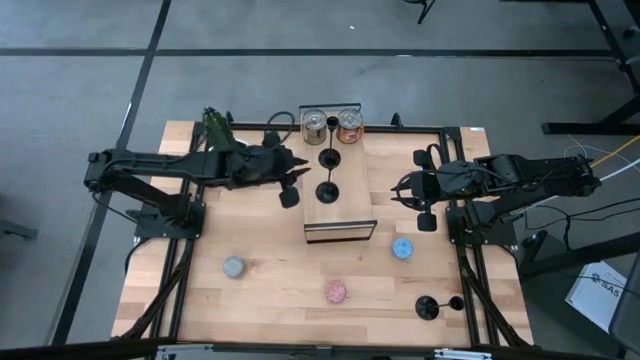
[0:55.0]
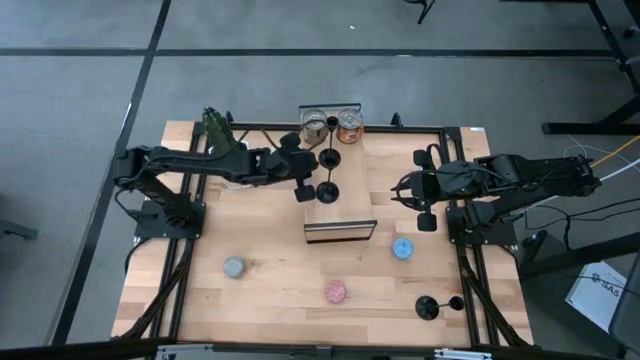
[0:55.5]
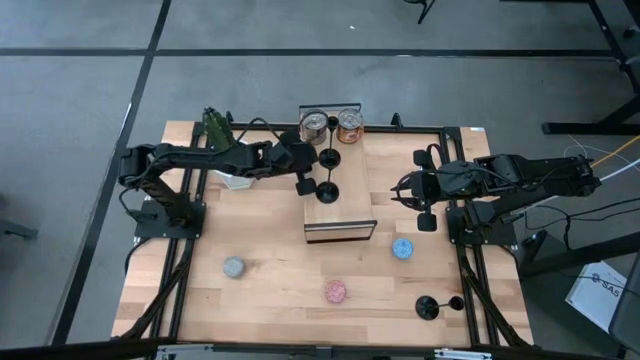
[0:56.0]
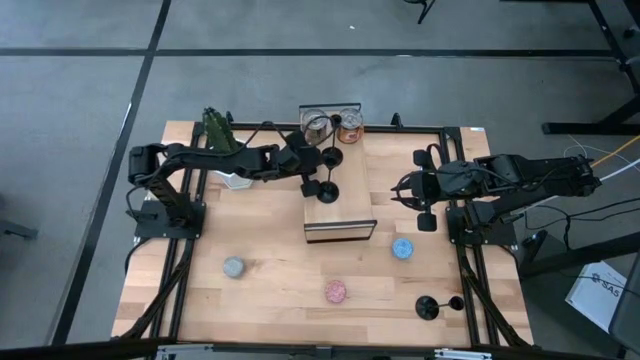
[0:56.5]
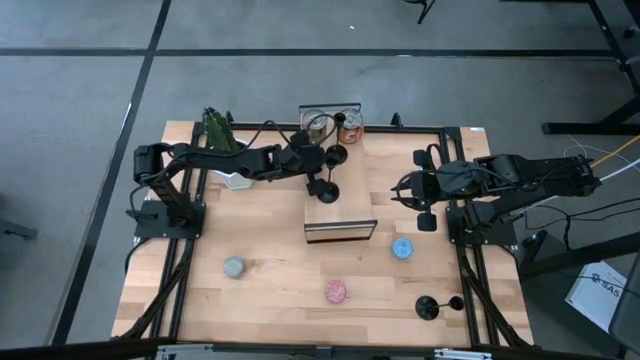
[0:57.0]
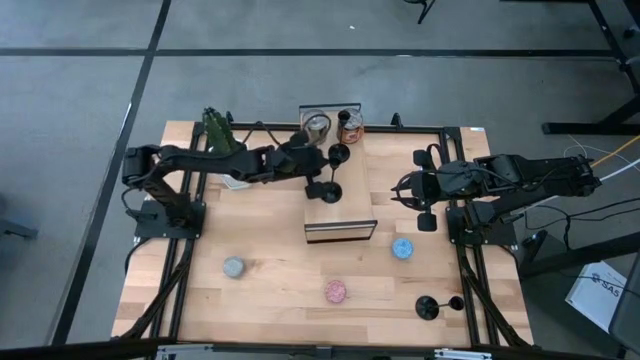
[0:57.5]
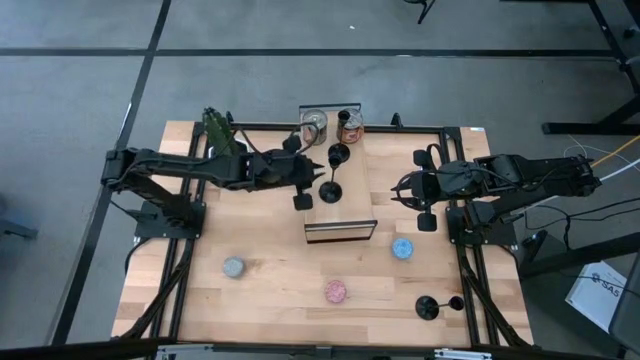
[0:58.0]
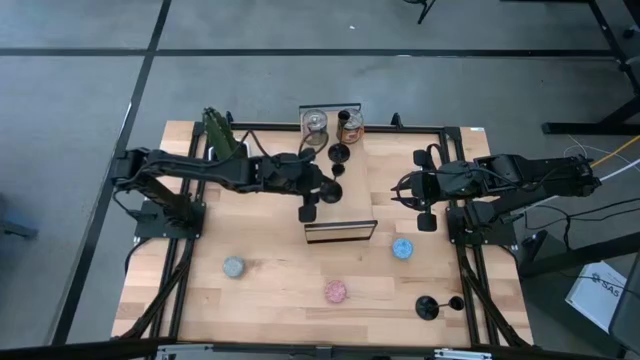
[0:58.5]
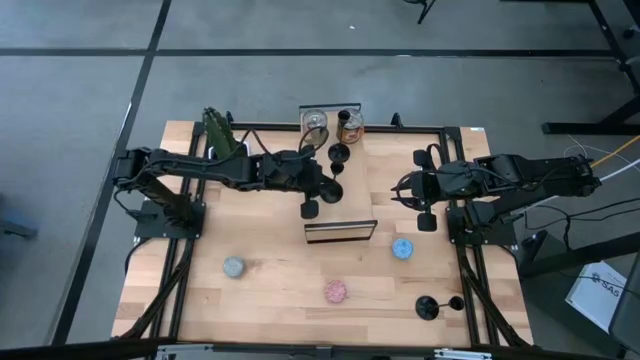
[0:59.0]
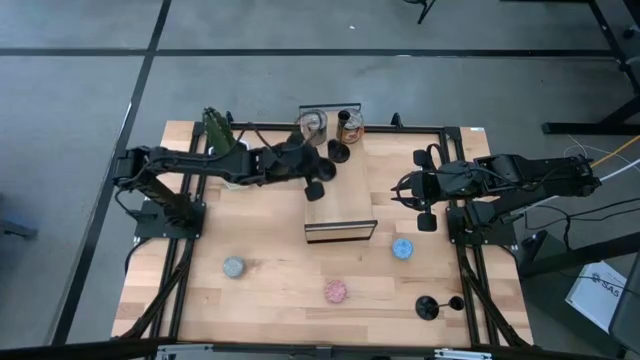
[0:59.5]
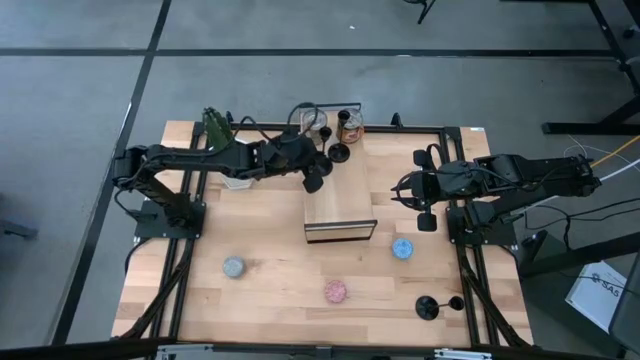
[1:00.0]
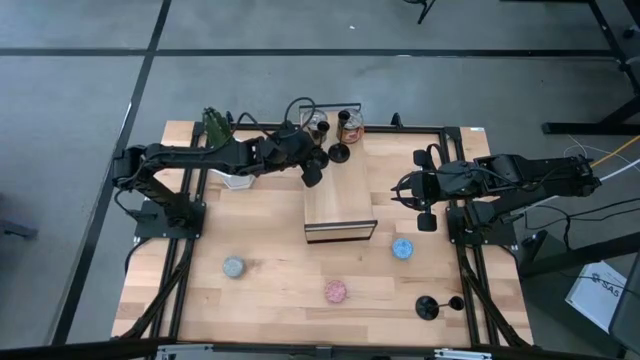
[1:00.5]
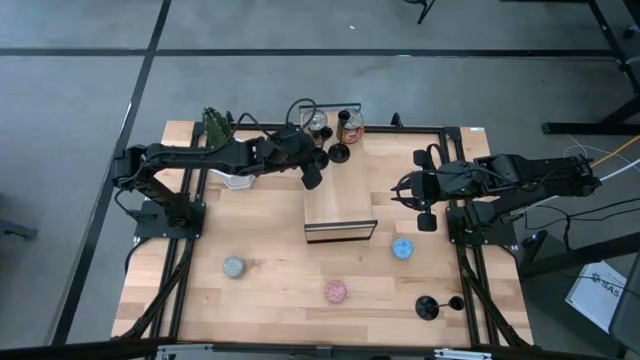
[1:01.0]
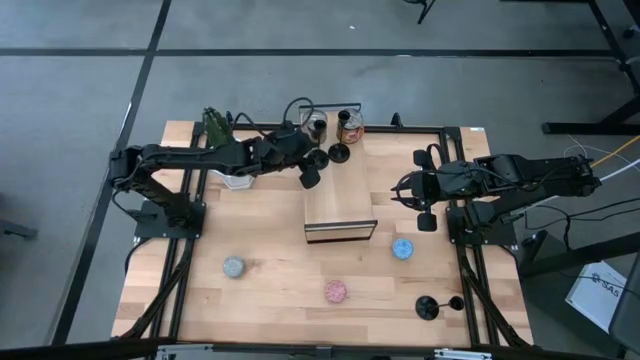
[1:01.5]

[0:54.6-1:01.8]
Task: Pick & Place candle stick holders
Adjust the candle holders on the shelf

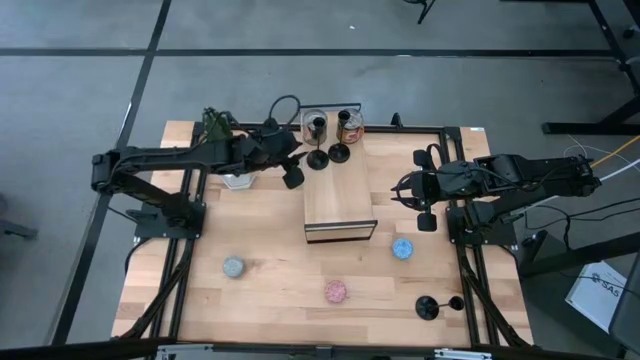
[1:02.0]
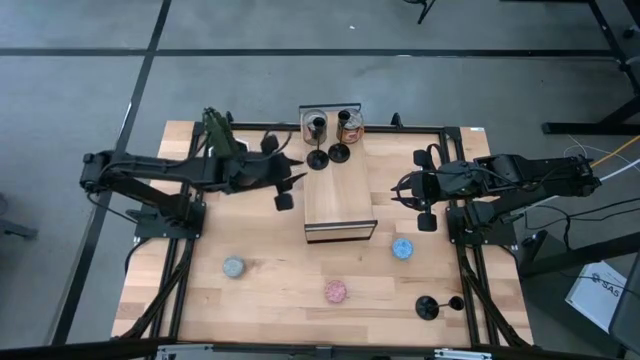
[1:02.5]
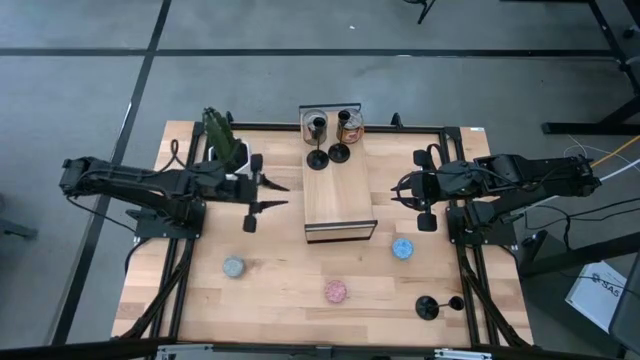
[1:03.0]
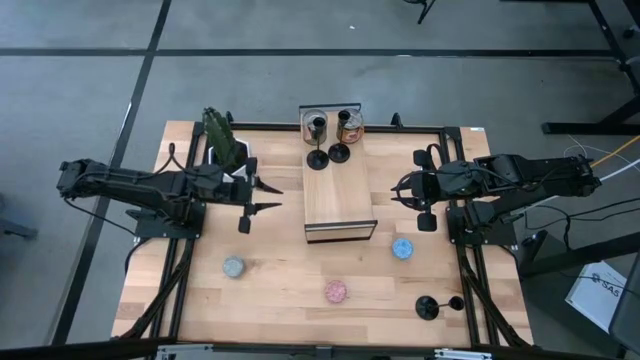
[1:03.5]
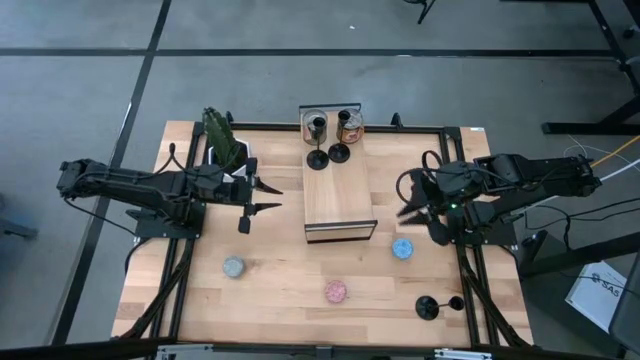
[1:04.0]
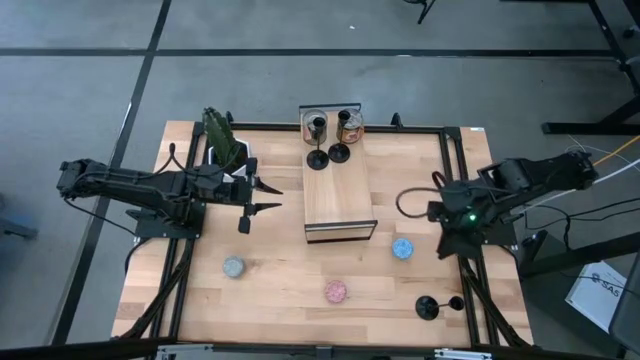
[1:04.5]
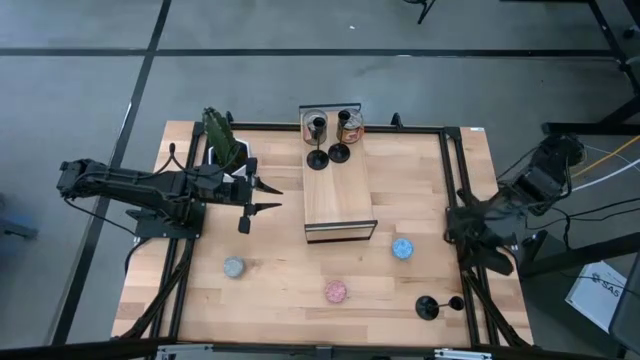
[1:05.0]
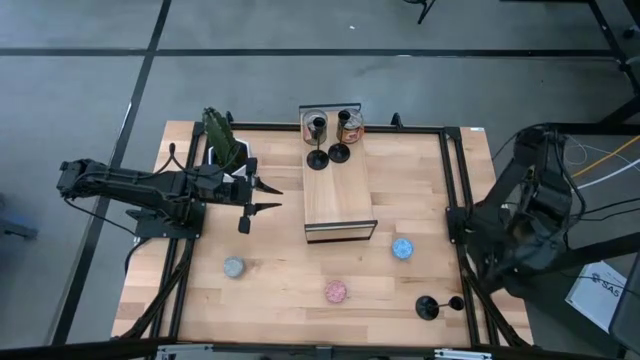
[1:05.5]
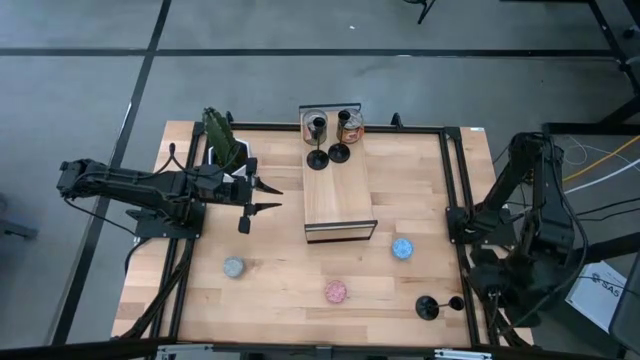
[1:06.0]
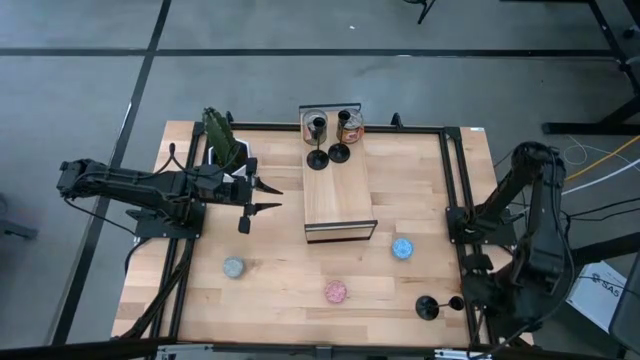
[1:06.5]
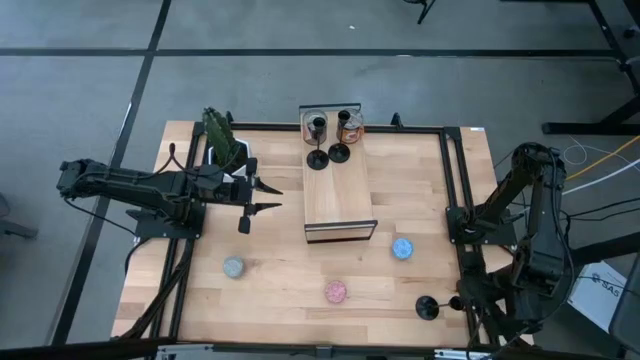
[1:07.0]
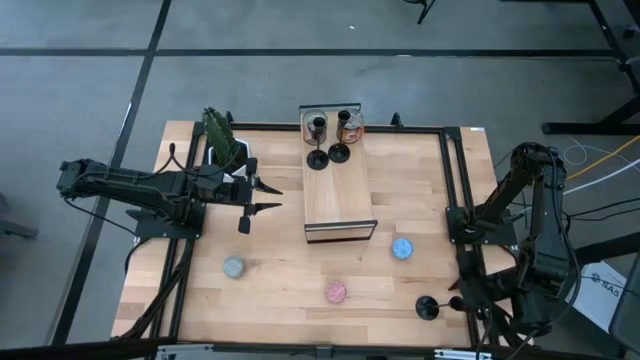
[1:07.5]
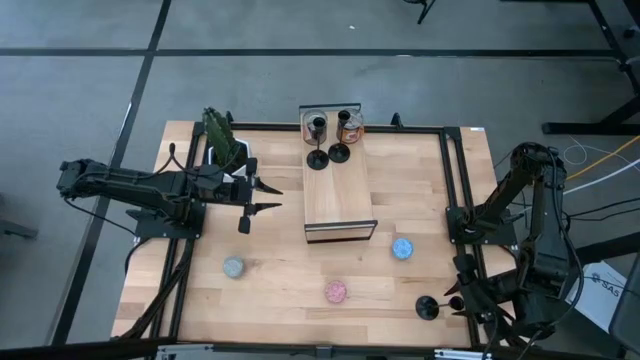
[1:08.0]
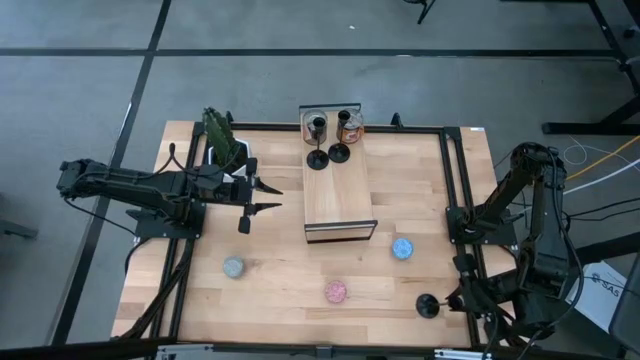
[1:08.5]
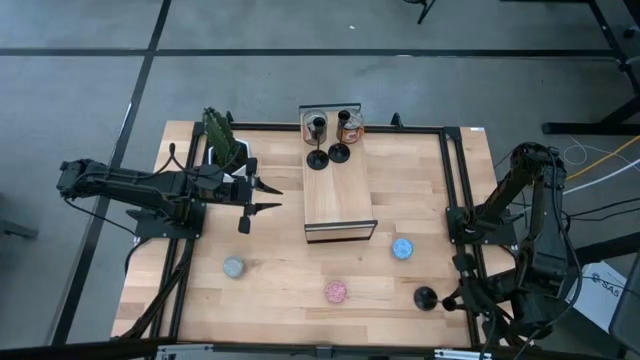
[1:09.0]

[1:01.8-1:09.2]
Put the candle holder on the shelf

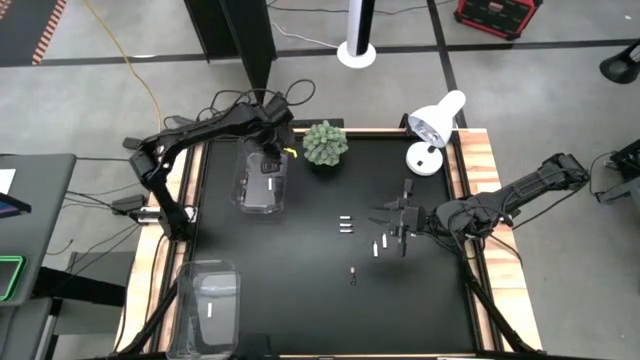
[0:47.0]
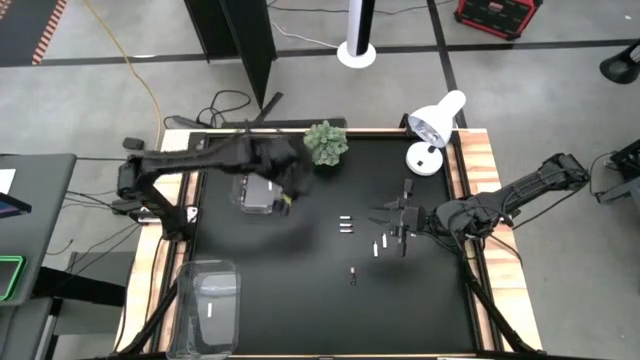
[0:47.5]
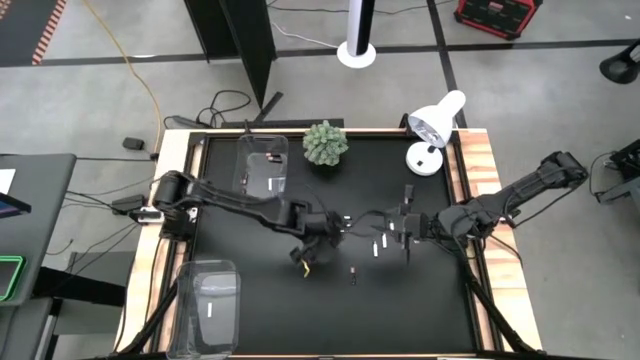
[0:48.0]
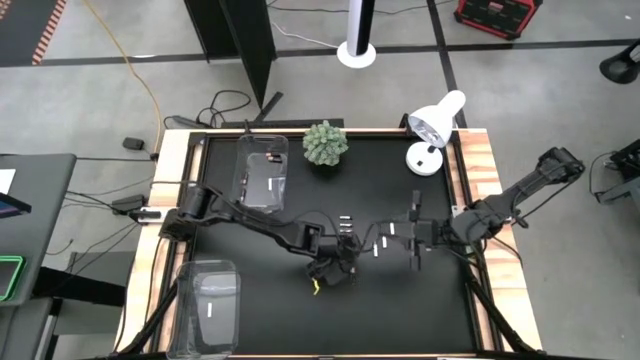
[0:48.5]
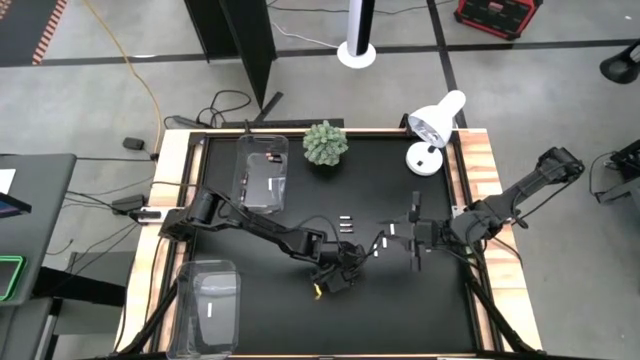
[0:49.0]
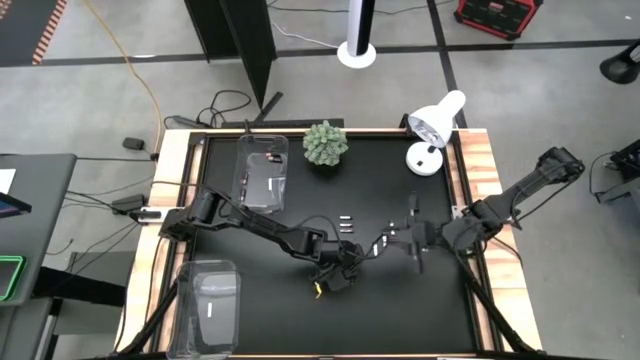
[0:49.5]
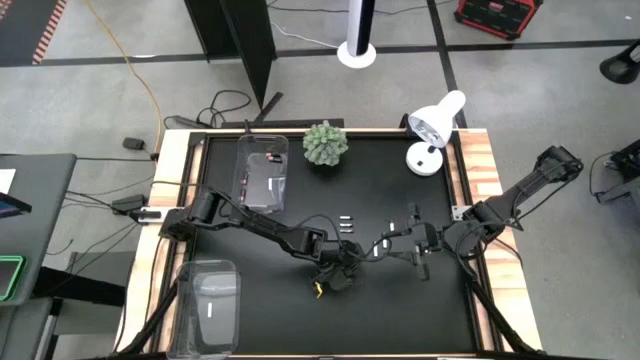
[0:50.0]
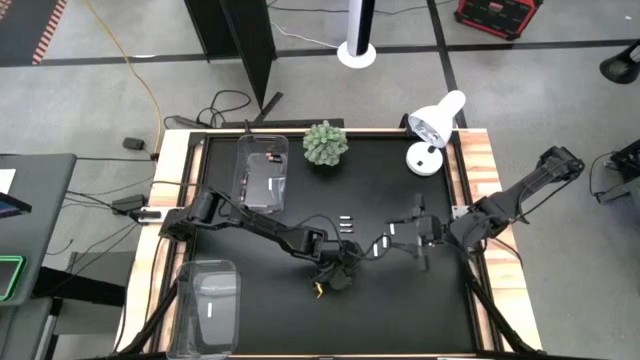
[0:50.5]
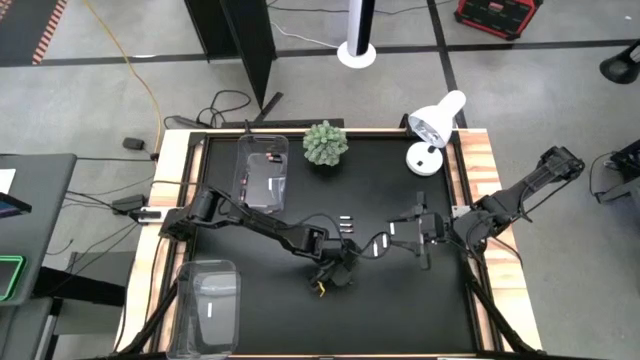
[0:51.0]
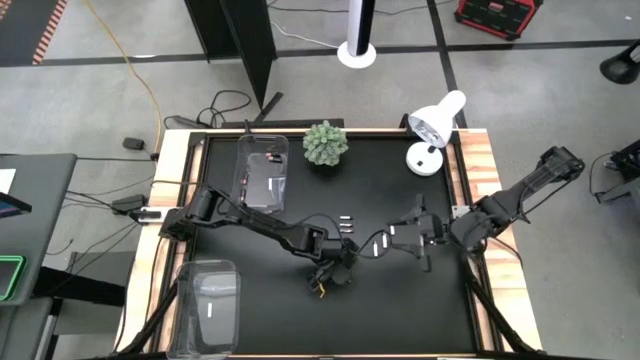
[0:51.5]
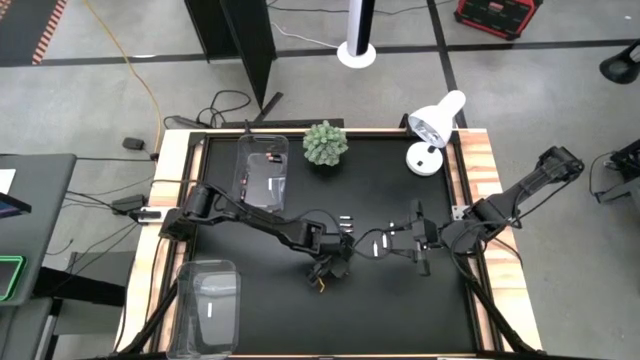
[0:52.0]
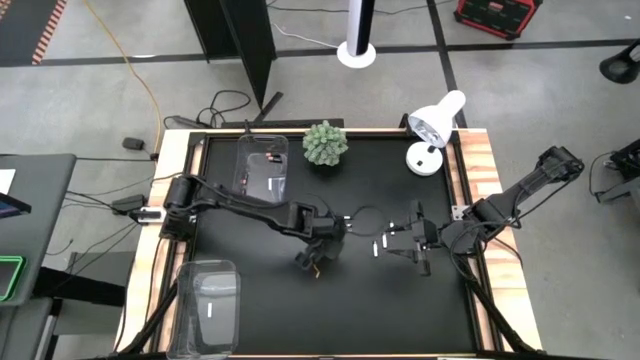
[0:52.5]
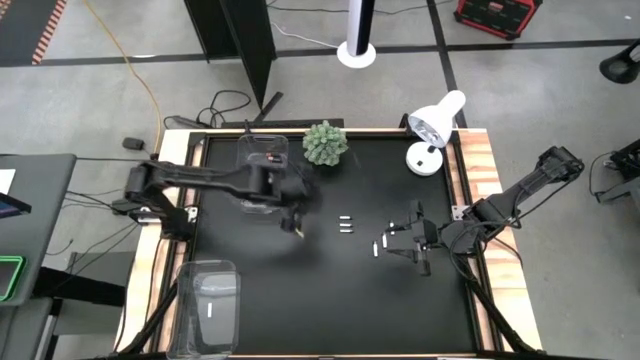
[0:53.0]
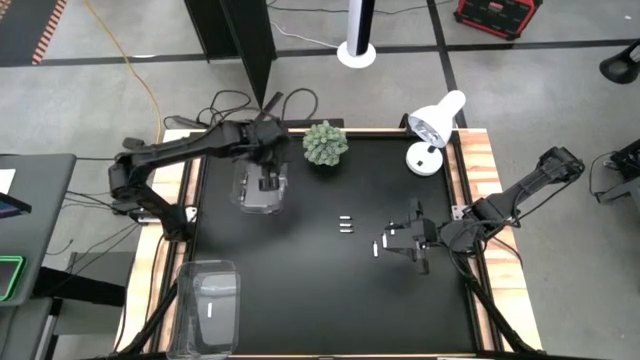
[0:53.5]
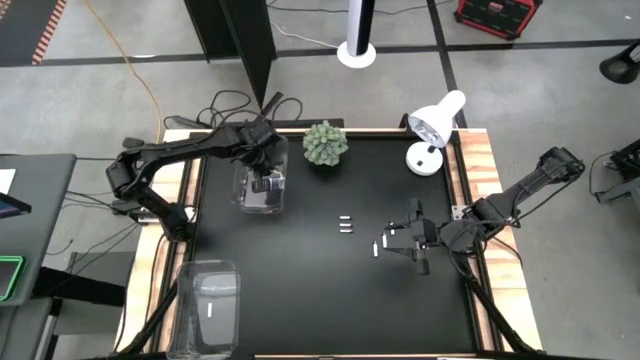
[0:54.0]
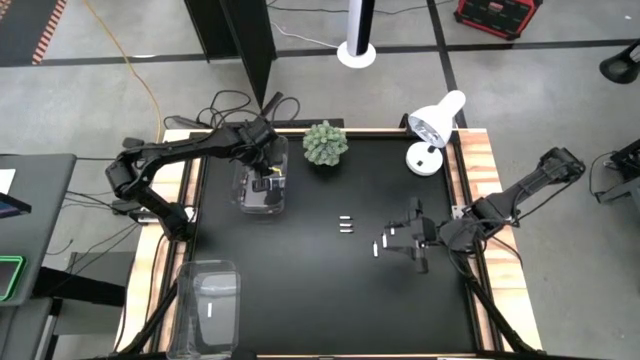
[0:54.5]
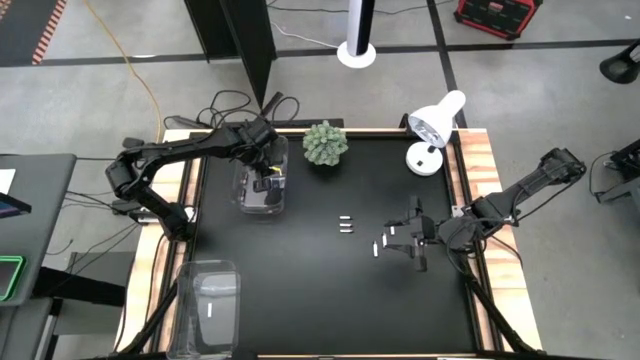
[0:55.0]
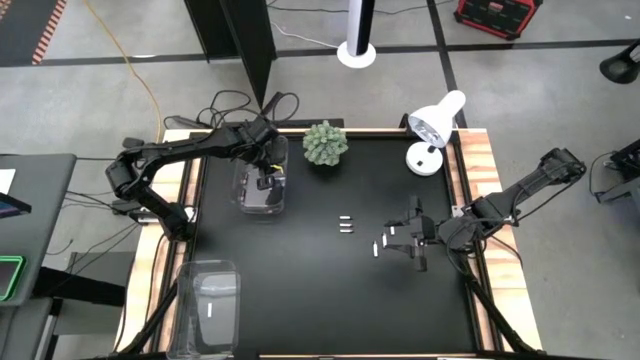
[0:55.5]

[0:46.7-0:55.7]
Task: Sort batteries
Put the copper and black battery into the top transparent bin
